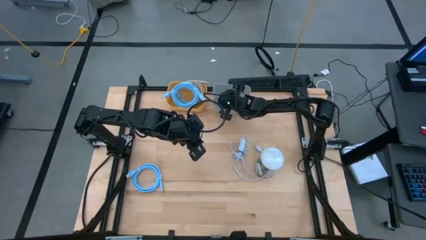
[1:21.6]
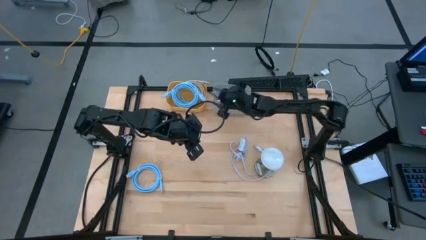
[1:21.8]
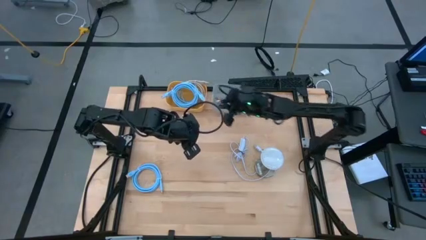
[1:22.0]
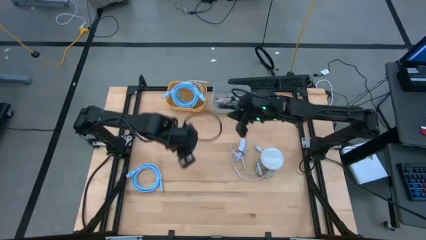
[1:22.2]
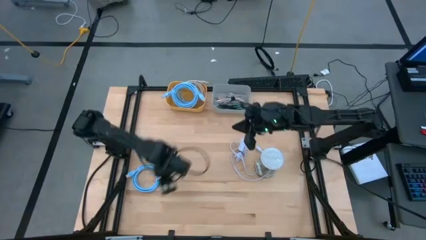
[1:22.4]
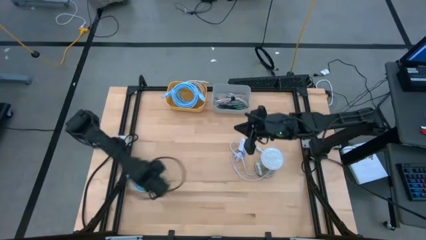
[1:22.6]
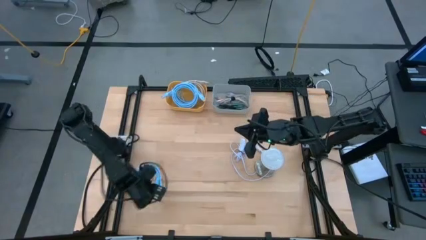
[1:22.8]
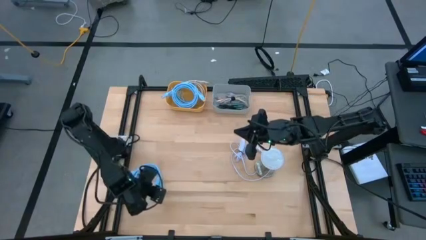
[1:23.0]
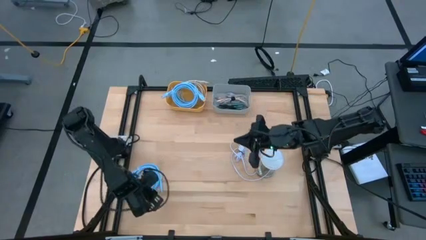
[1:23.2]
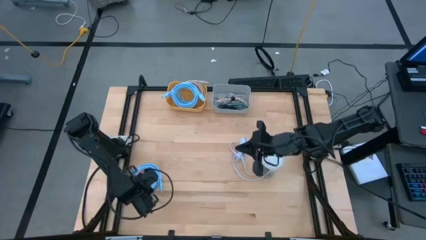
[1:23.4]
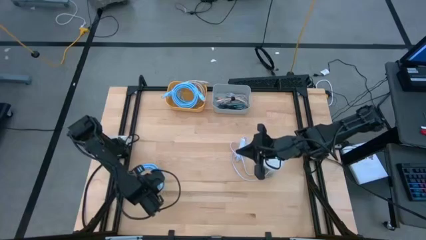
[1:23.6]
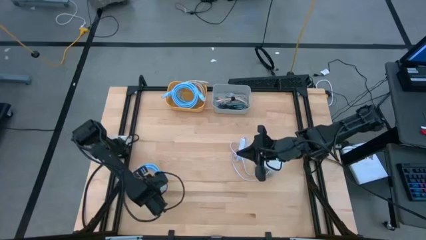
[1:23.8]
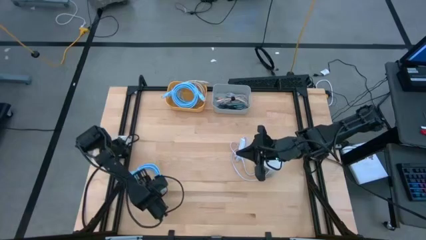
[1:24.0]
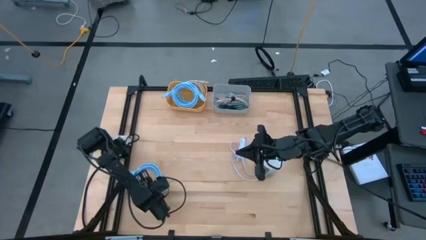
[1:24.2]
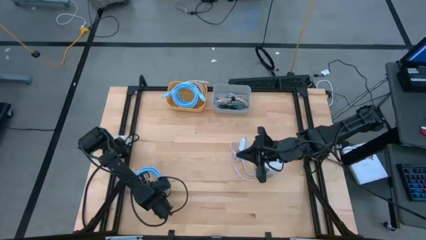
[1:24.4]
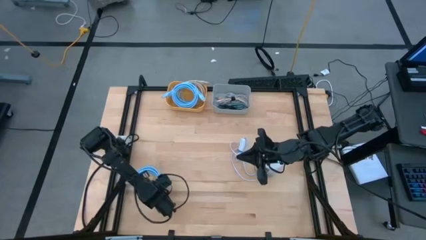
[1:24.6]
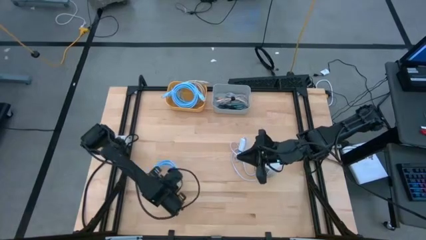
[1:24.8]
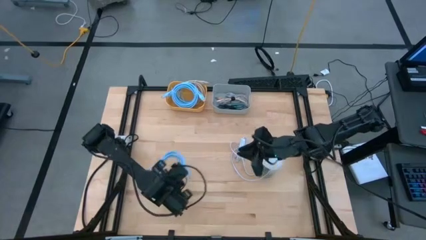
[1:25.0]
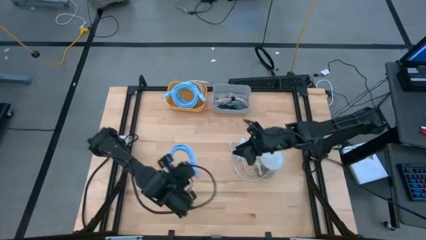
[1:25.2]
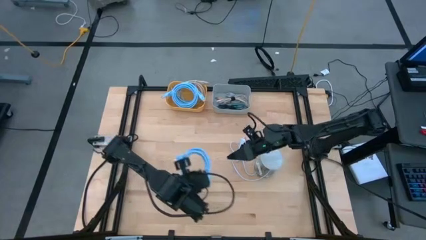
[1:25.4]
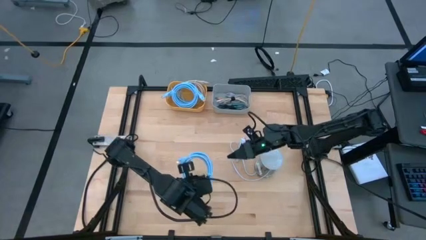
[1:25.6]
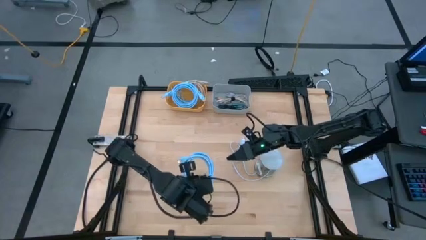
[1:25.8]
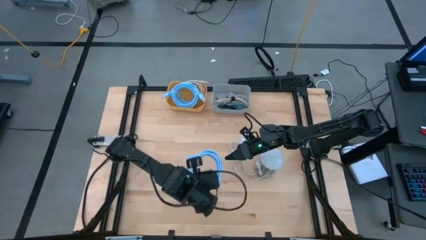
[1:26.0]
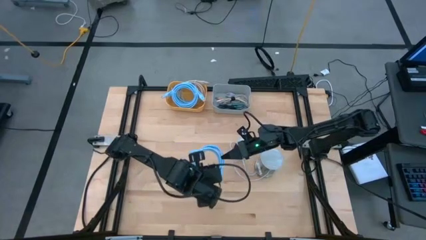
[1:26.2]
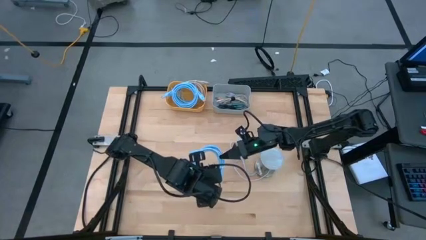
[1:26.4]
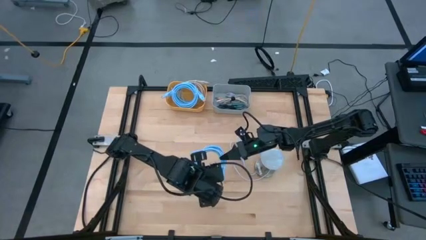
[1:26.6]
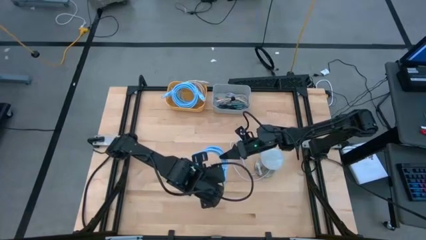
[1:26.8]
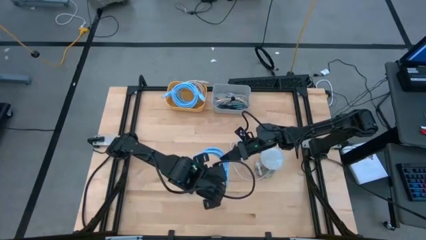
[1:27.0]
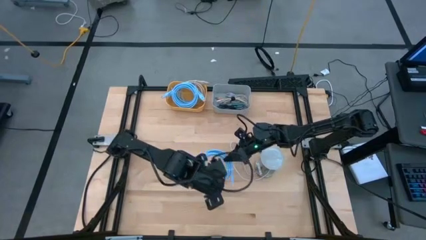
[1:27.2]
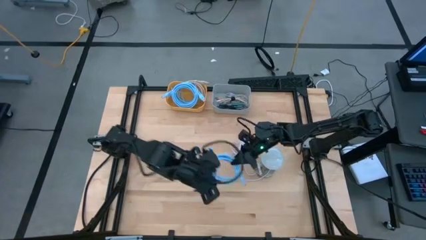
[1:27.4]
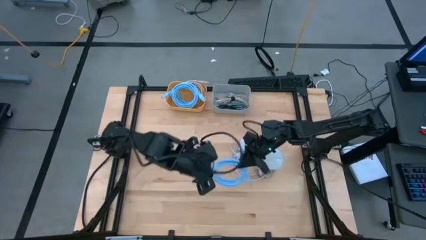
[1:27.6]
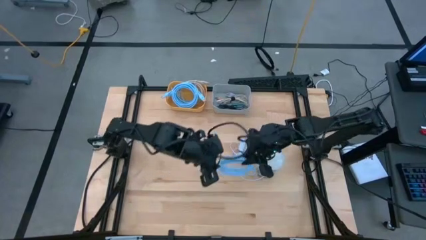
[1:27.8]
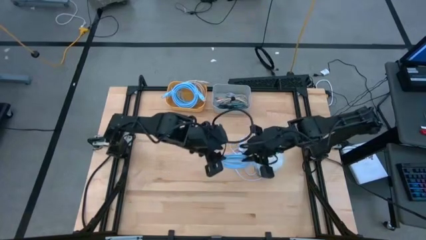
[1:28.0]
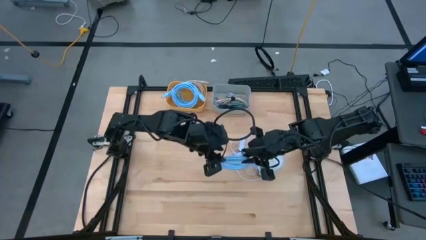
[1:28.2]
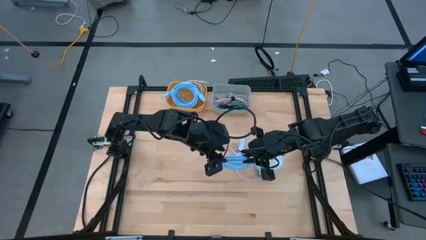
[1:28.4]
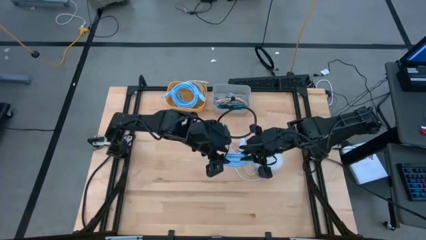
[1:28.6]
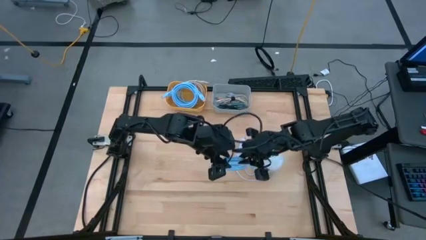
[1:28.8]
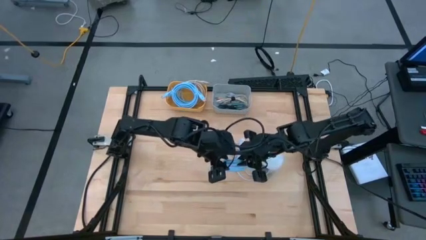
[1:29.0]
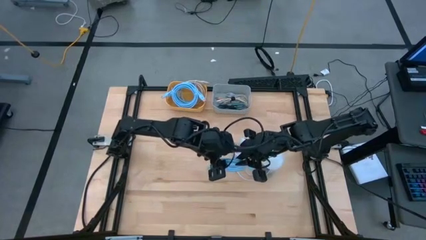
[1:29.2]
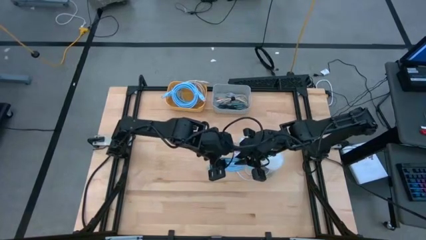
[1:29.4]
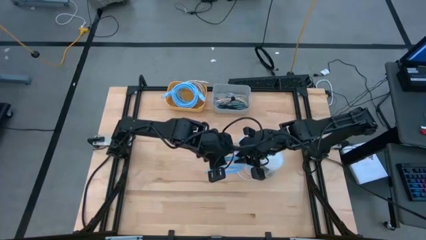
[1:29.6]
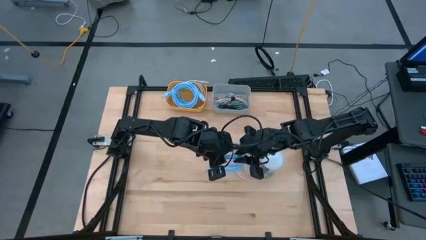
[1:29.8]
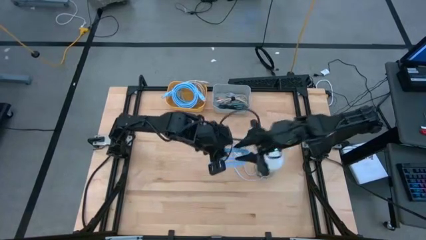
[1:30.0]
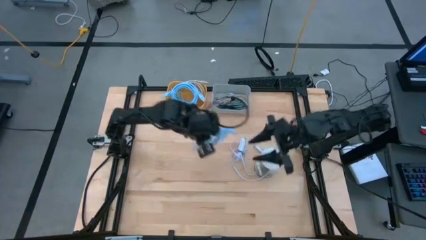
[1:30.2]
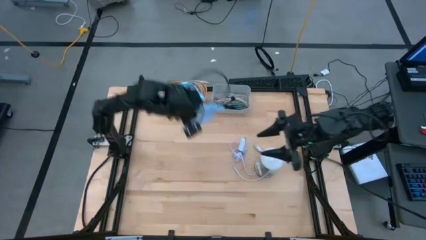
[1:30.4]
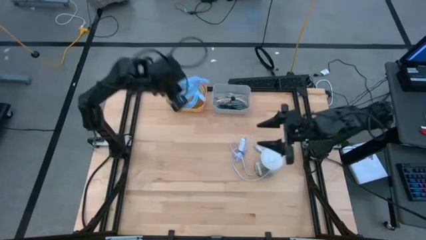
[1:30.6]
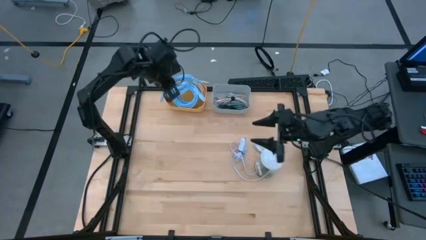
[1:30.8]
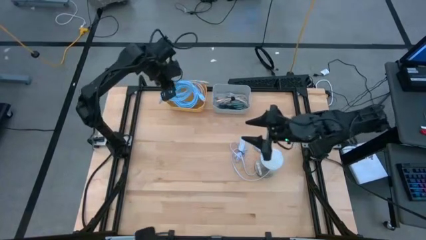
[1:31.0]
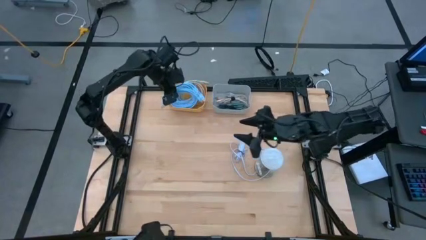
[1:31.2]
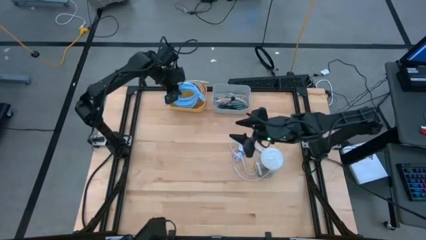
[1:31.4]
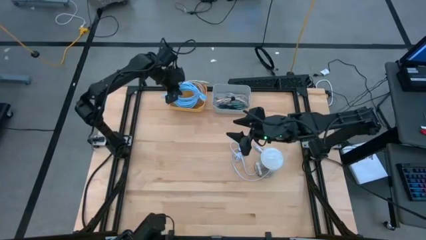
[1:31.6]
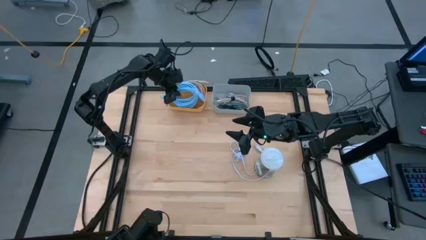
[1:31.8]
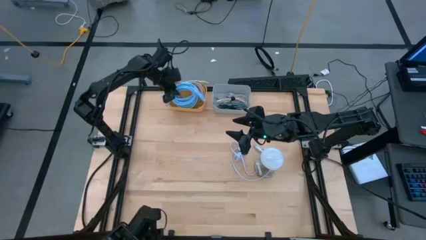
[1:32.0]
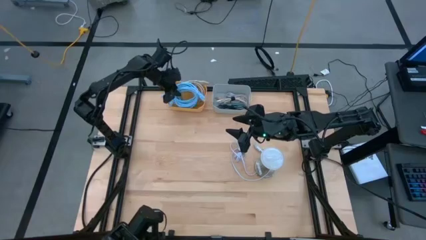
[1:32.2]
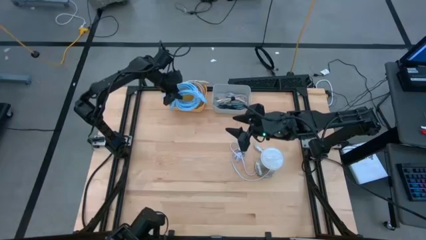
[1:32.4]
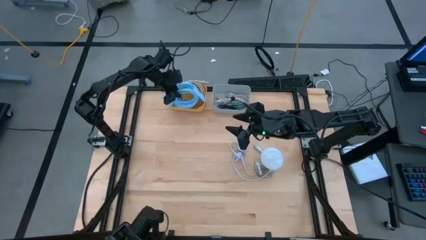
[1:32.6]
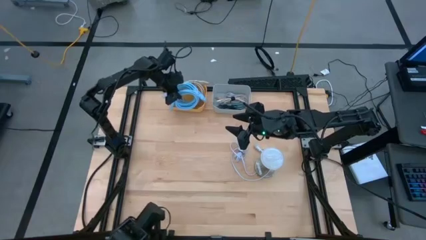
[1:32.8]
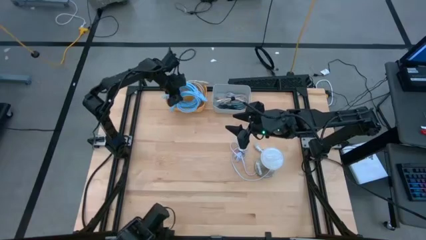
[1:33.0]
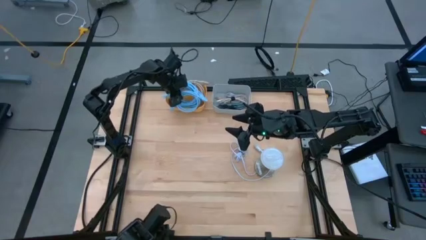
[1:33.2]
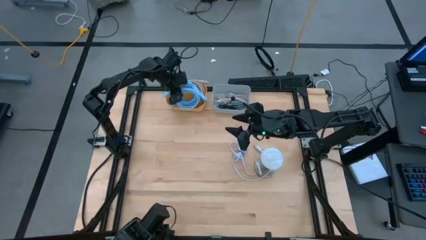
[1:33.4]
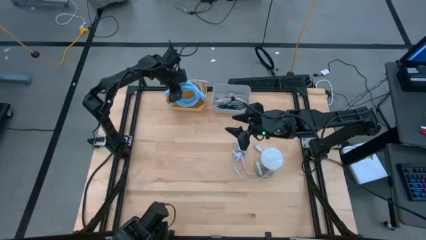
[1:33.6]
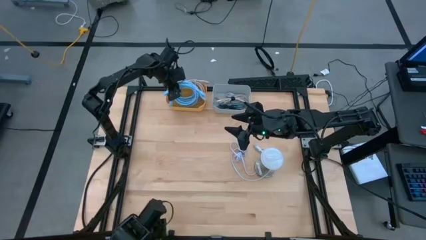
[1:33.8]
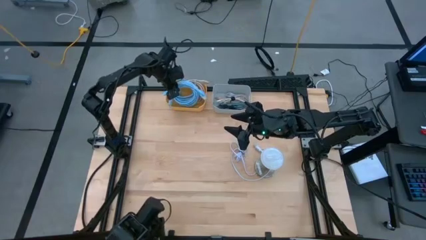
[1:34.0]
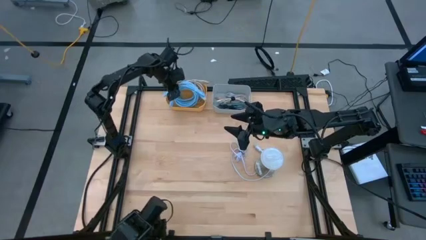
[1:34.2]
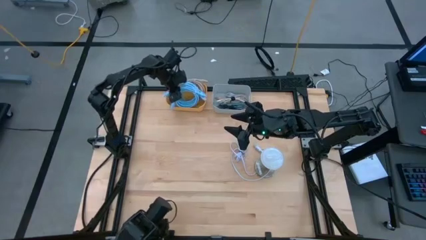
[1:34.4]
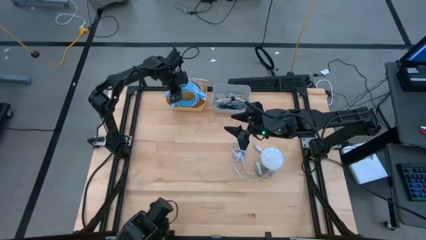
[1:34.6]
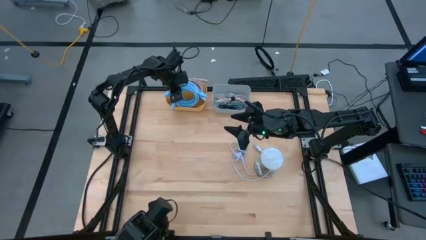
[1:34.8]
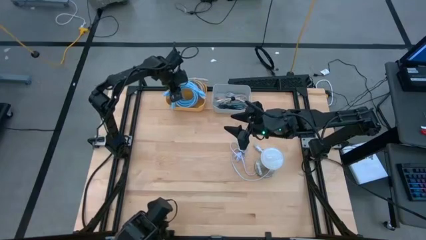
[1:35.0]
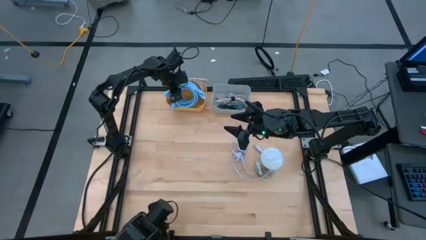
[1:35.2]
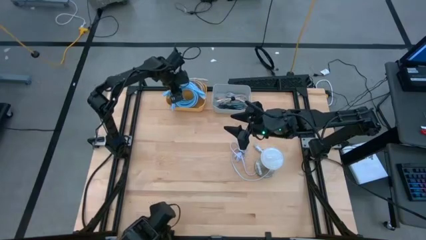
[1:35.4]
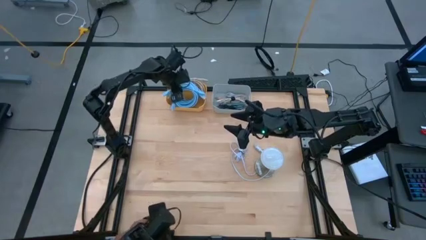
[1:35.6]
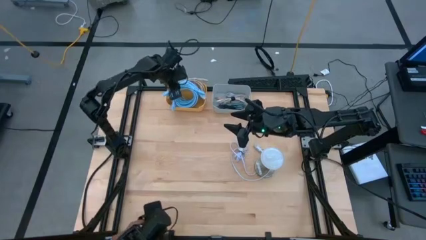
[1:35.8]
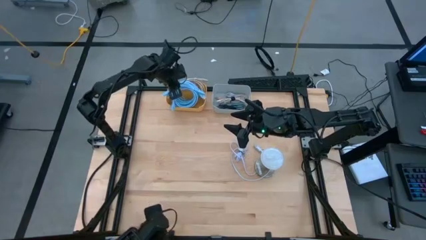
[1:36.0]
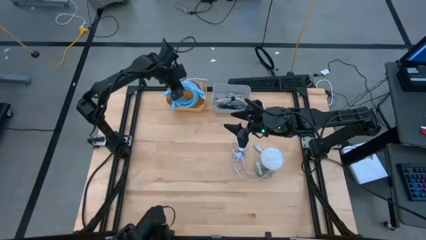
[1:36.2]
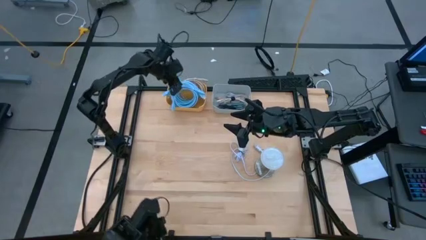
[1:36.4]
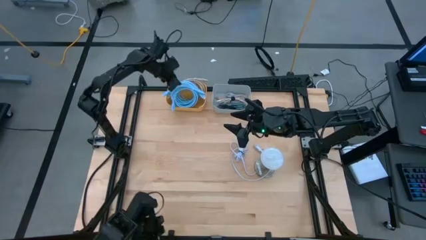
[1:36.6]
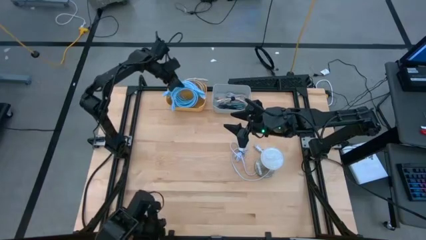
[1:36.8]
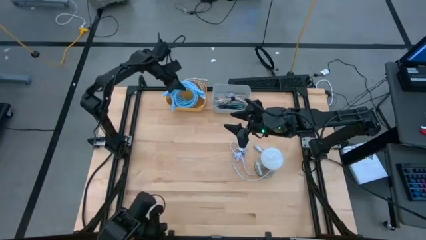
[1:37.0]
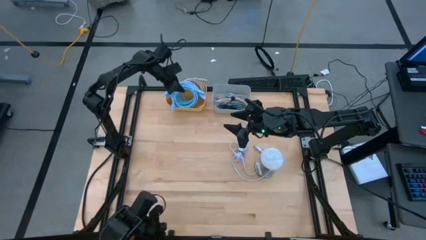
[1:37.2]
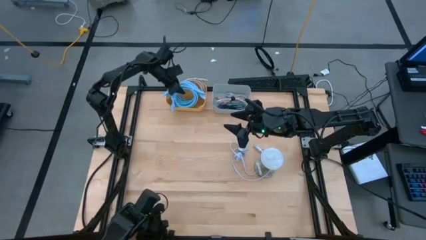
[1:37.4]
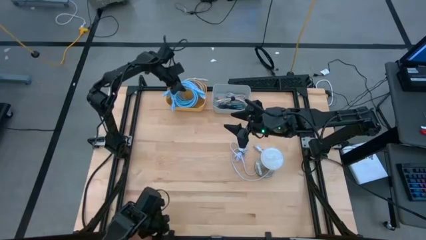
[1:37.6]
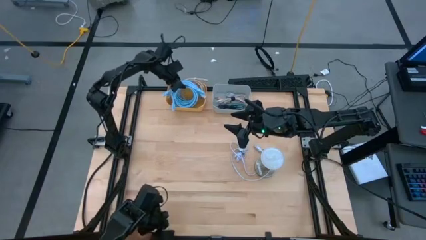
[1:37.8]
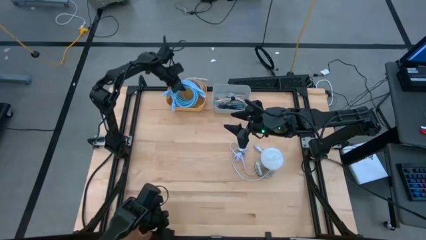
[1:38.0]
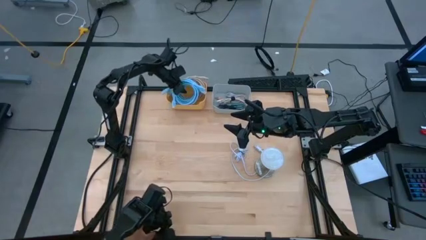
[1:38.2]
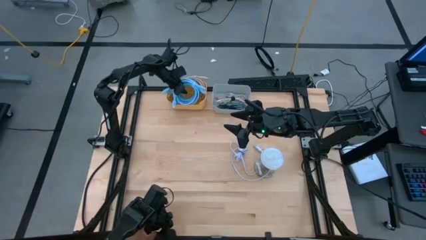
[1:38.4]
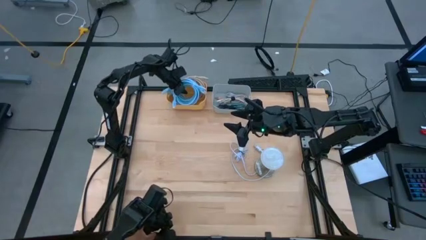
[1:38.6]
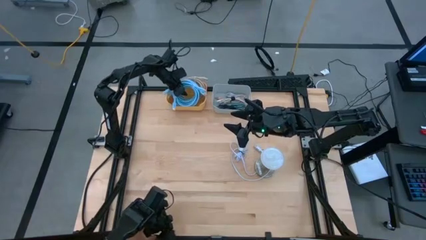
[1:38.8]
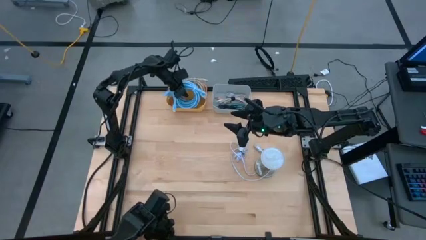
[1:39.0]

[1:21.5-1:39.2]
Task: Pick & Place USB Port
Put the blue HDMI cable into the yellow bin
